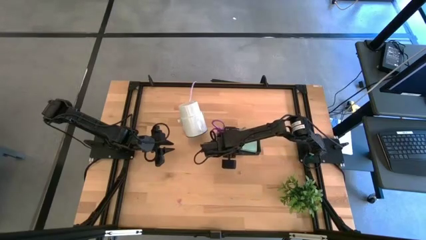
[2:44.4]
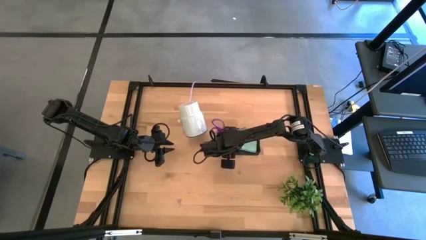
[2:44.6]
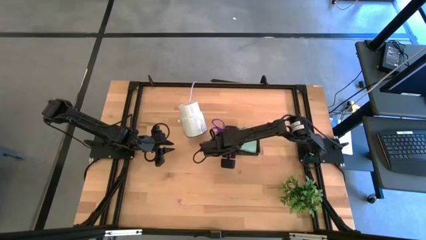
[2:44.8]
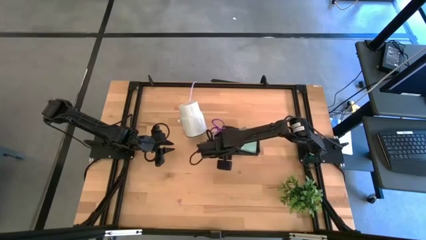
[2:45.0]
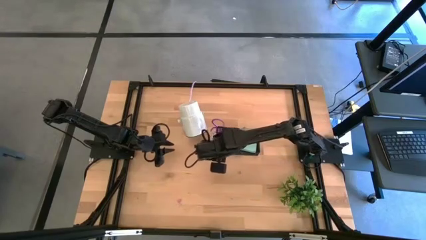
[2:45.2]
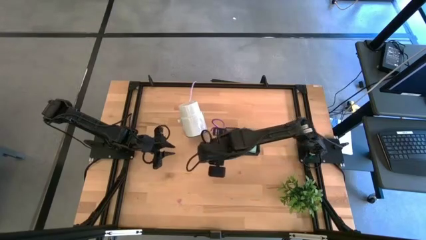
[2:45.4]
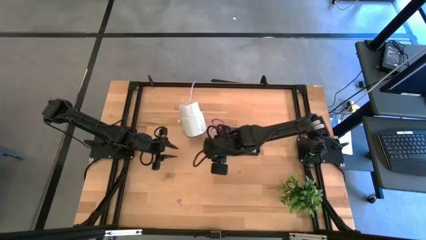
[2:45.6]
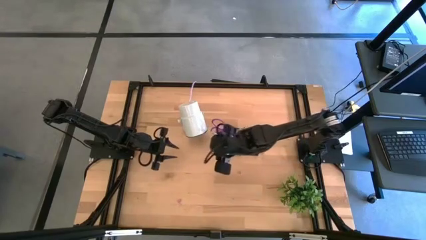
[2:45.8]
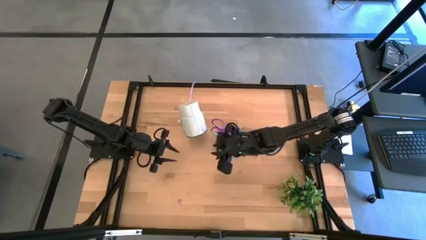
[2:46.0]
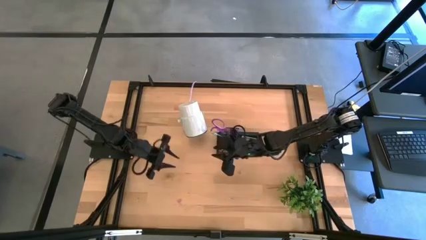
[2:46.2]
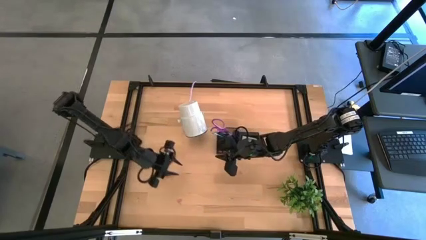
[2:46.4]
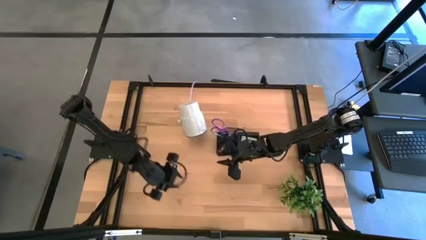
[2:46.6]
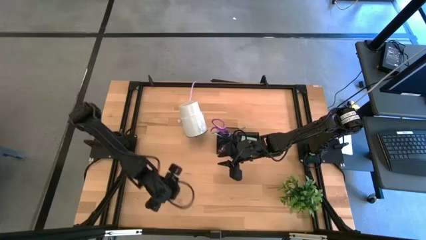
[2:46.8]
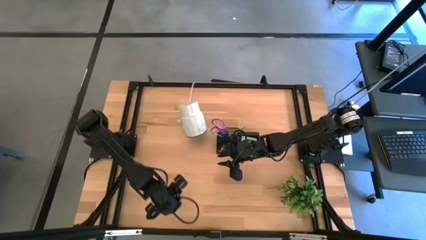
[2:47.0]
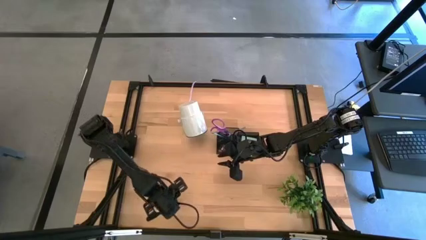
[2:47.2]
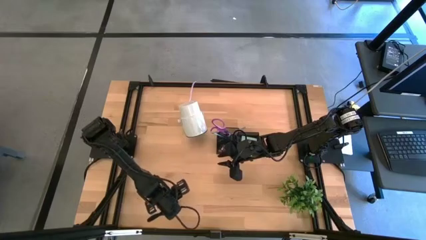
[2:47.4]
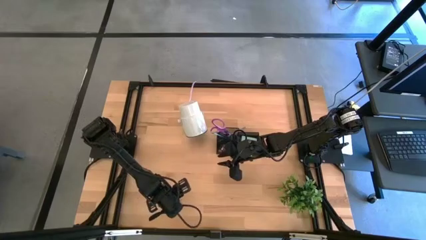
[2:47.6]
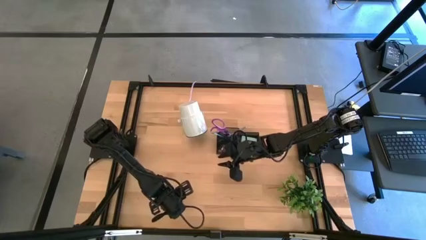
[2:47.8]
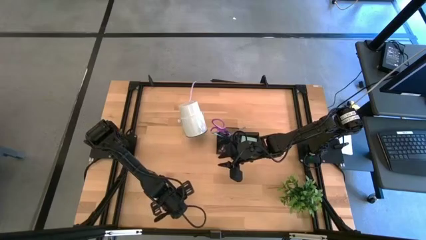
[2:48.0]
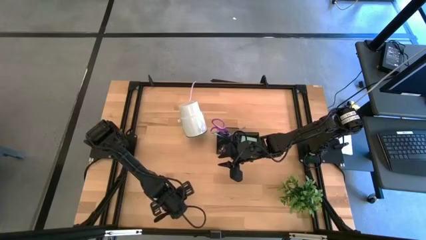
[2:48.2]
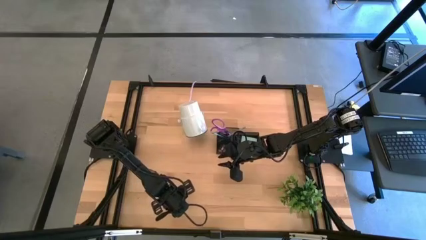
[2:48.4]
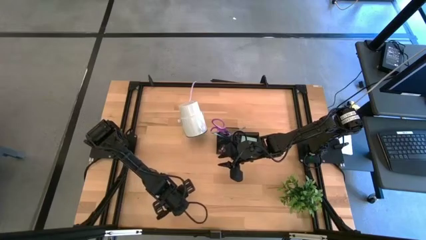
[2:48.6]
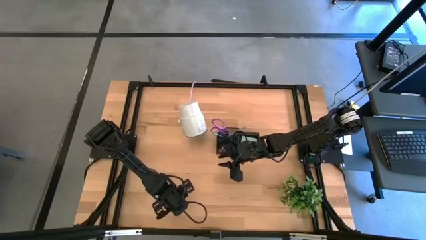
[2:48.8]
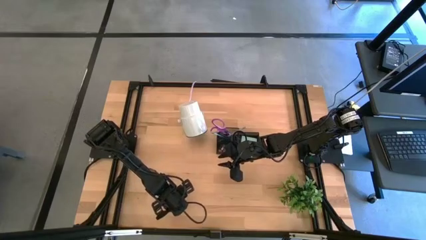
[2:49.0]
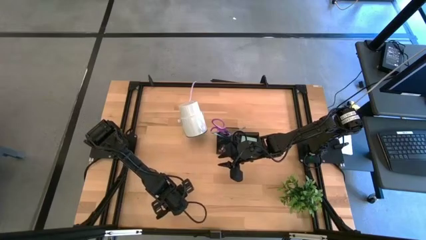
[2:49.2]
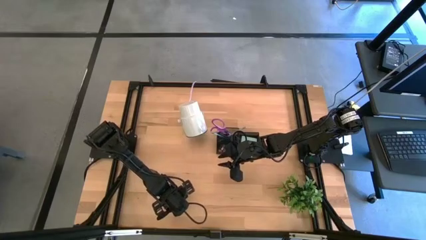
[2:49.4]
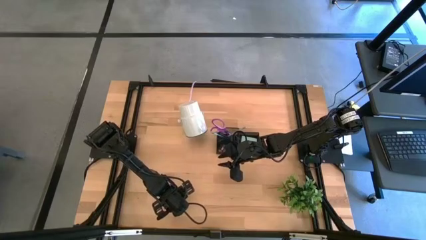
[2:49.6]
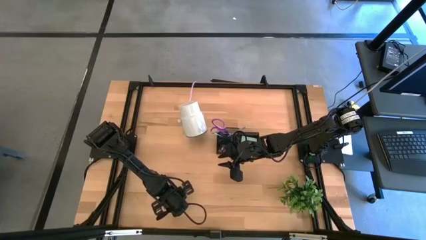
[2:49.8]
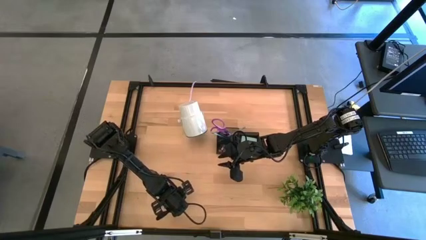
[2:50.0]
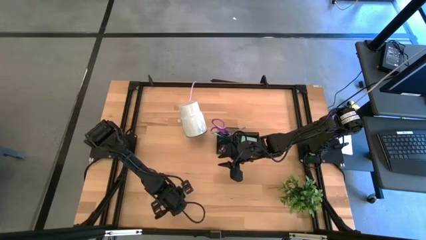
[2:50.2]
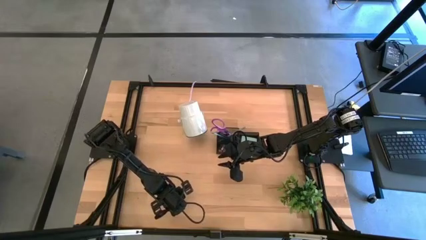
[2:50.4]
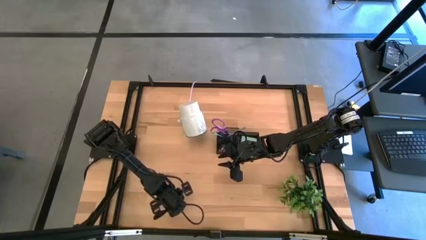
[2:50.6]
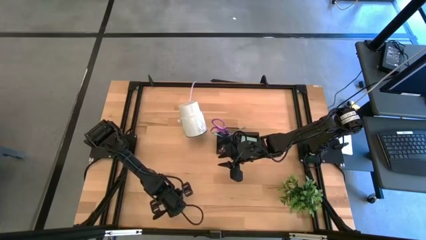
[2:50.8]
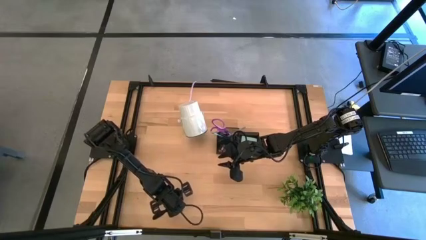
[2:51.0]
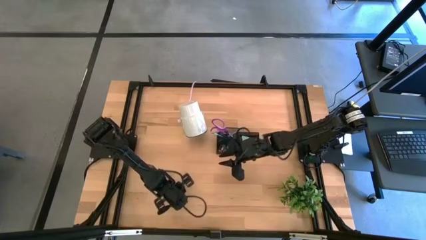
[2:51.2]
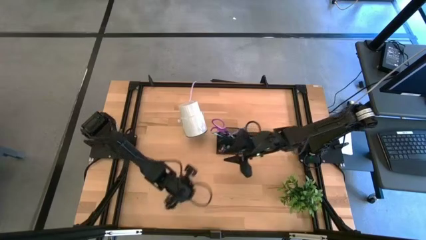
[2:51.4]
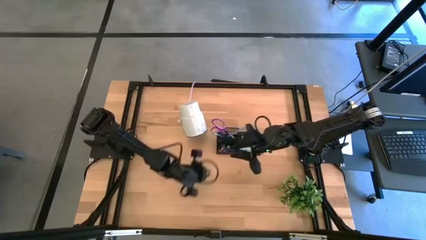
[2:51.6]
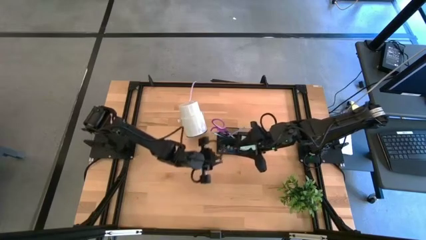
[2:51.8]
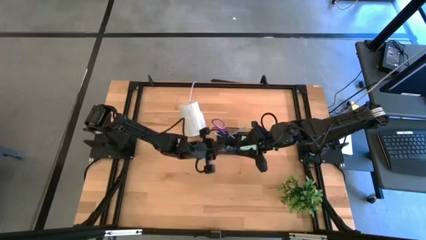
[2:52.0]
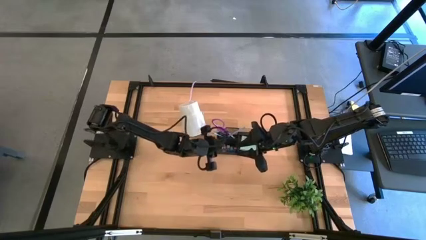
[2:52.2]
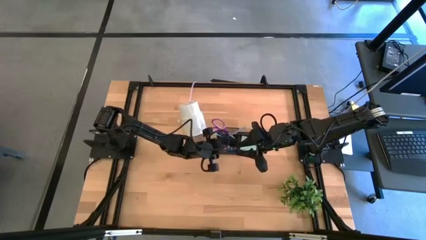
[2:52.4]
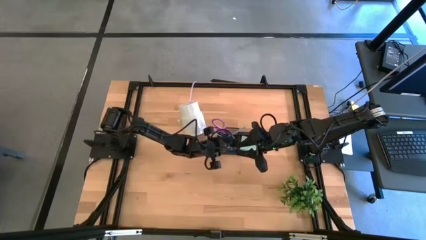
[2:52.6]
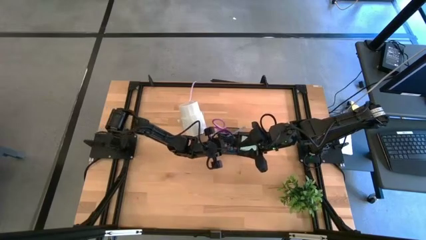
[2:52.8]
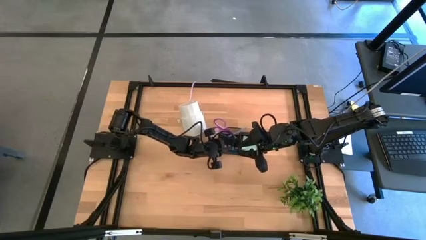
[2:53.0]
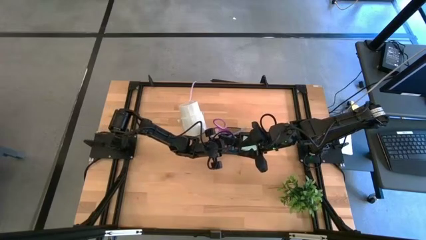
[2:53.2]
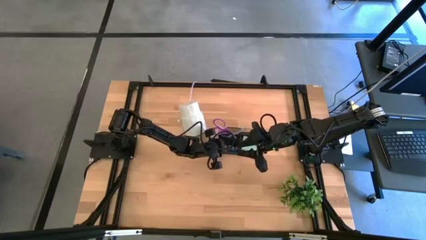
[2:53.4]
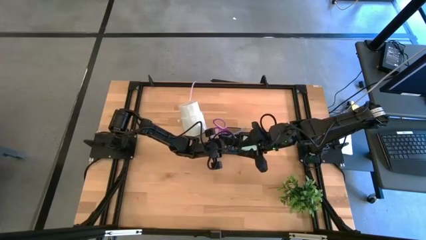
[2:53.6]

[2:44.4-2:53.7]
Task: Pick and place office supplies into organizer
Put the pink binder clip into the black desk organizer

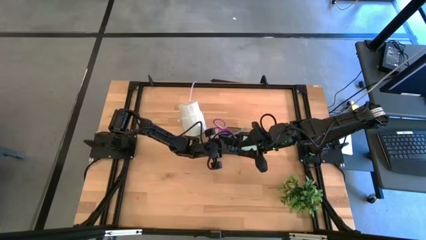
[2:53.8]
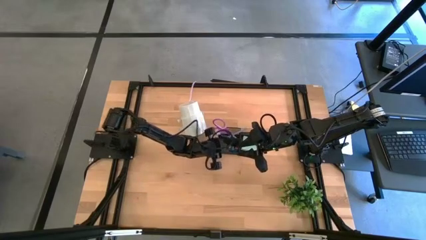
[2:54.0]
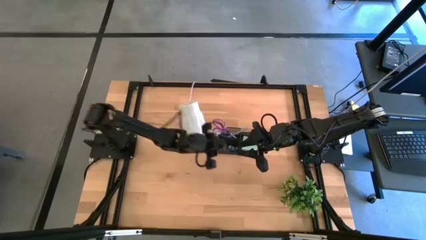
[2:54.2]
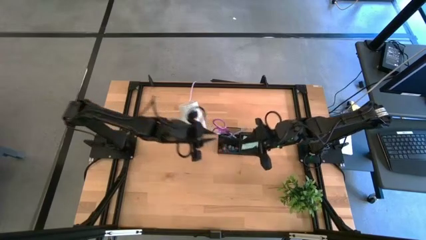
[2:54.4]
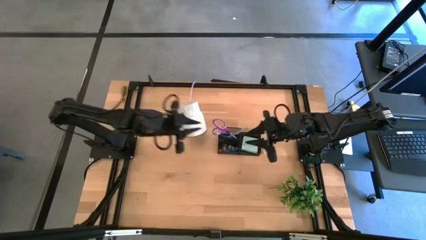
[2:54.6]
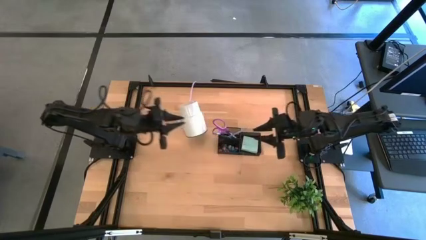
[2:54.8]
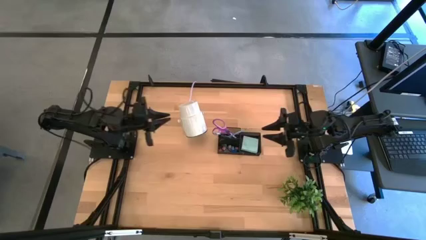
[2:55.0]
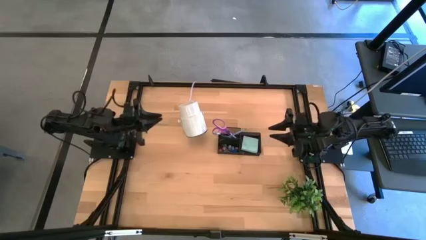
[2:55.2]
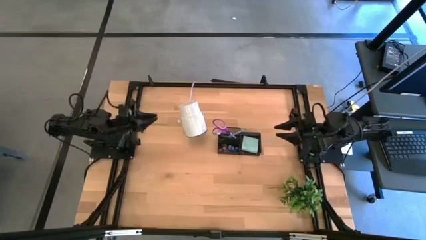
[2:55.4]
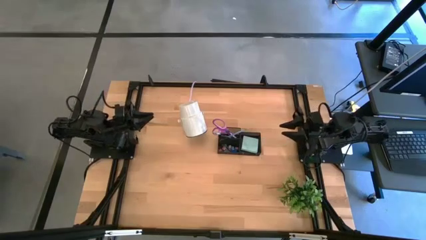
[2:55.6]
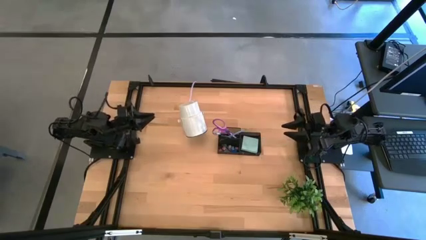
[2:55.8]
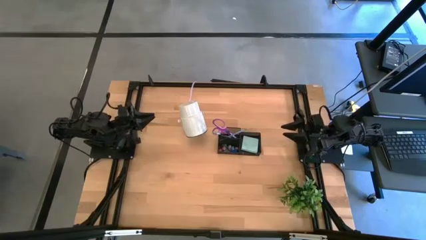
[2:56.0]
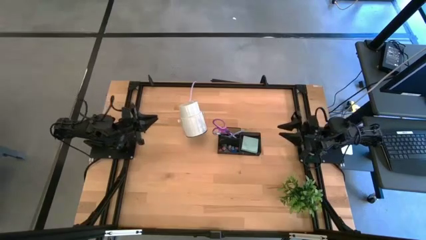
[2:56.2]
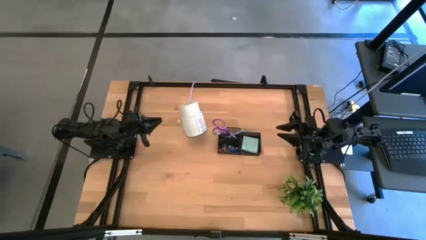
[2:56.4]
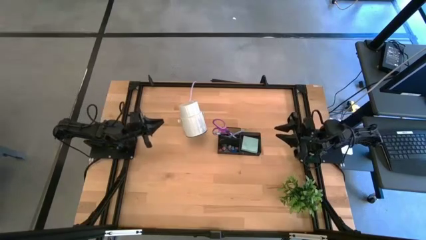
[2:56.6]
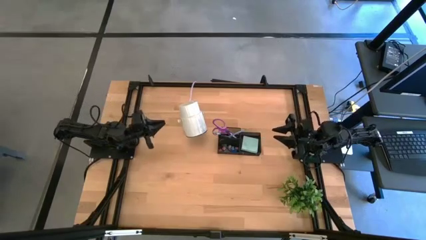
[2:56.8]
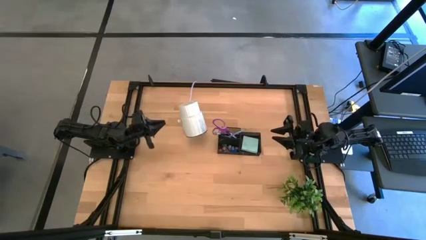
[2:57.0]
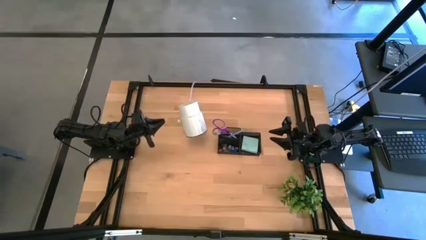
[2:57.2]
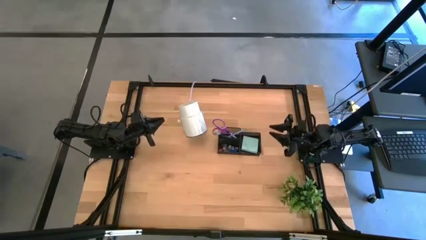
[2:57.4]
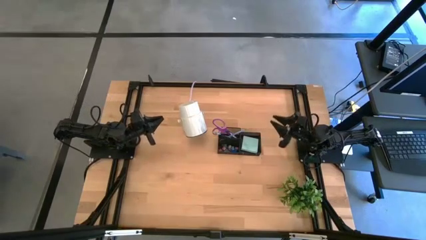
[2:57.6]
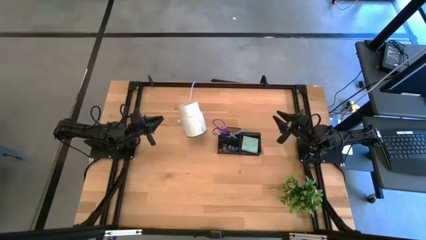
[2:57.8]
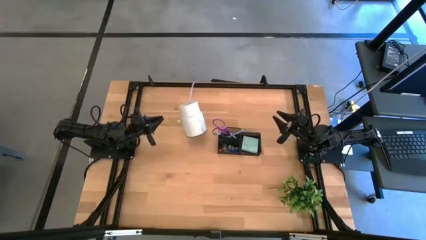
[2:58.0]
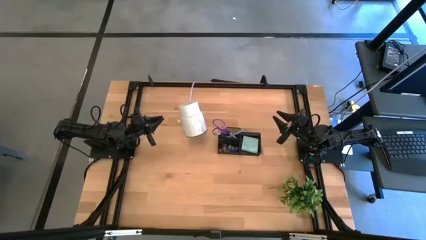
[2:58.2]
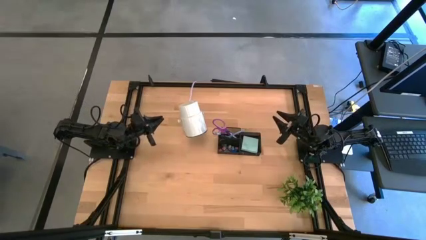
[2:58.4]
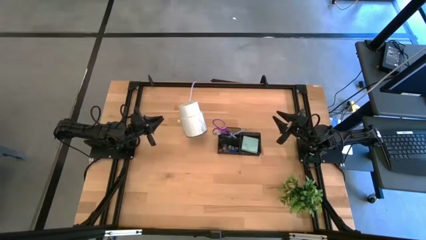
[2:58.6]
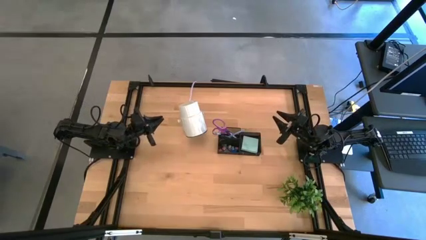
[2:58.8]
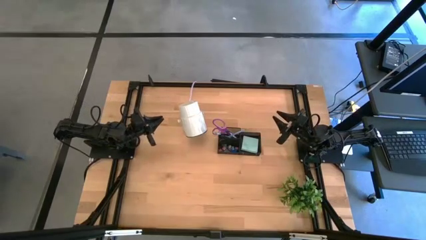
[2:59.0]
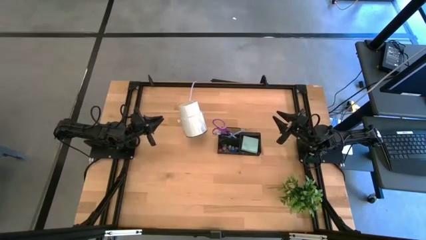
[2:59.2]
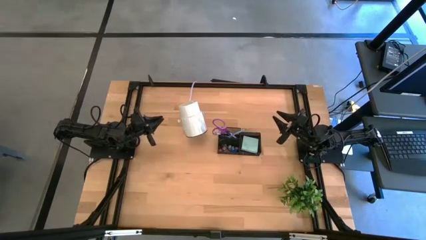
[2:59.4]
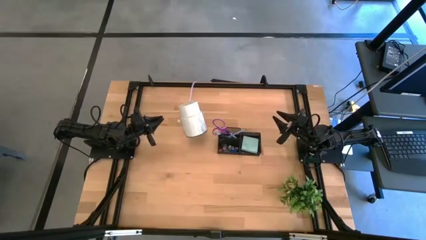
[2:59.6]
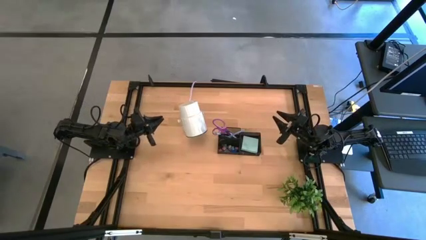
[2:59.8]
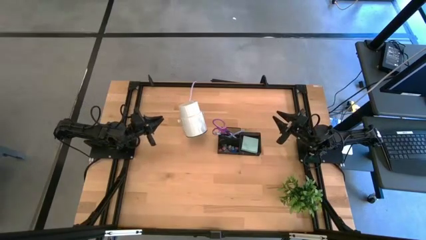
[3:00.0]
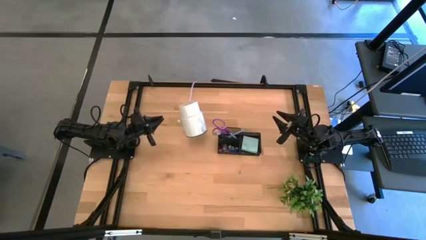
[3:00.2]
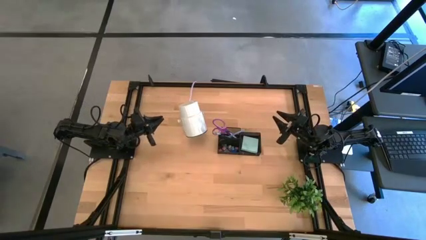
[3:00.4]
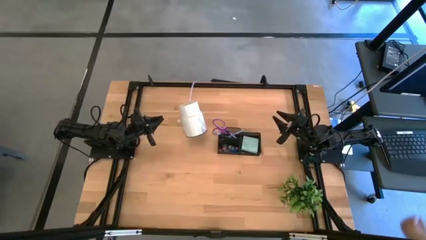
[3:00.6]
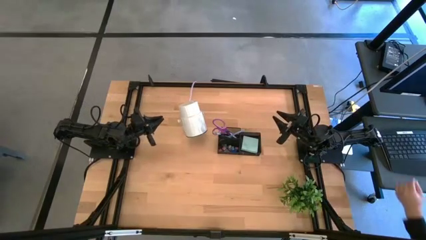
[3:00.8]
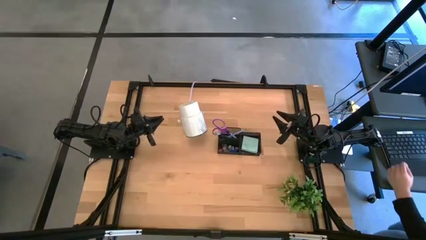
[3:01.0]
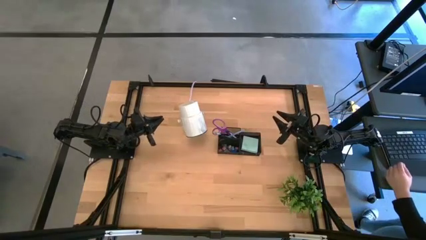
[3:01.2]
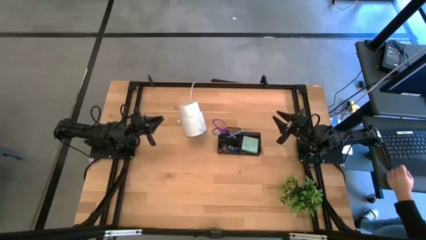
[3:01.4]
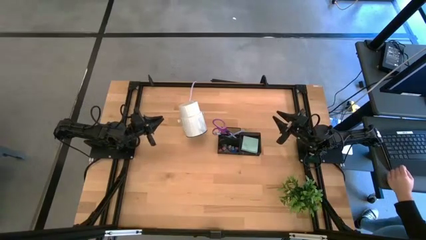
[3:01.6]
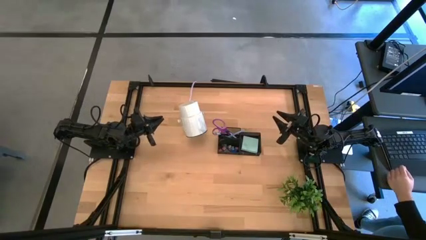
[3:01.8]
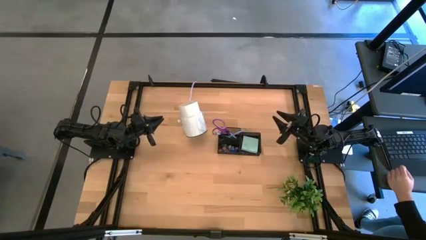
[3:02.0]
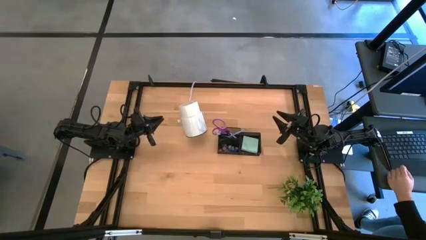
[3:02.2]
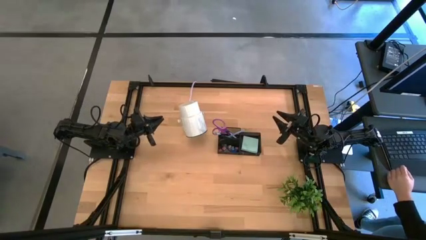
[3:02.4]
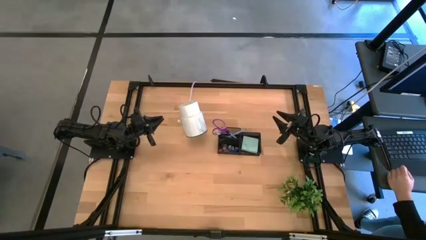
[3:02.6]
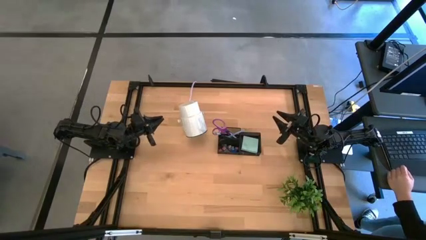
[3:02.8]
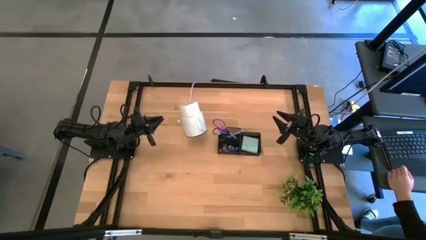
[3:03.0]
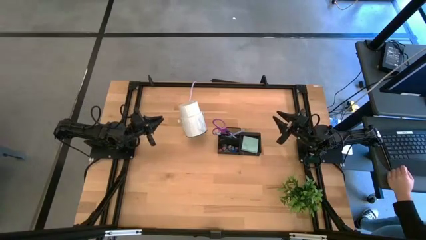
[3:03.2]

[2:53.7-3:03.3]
Return to Home Position
